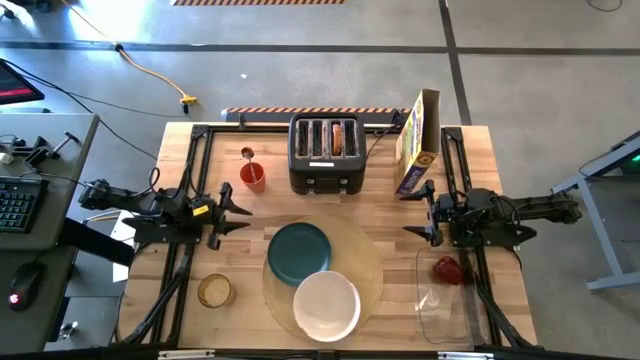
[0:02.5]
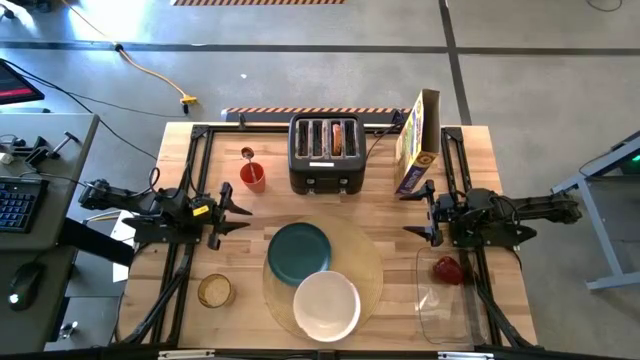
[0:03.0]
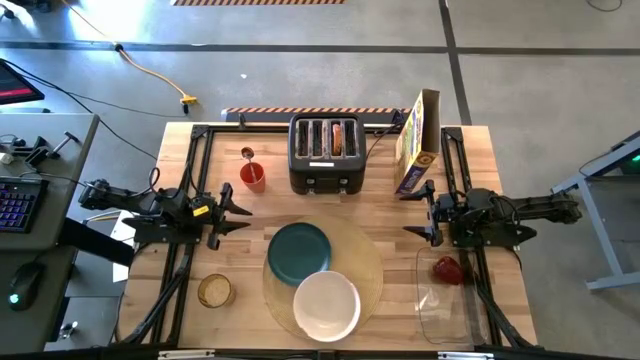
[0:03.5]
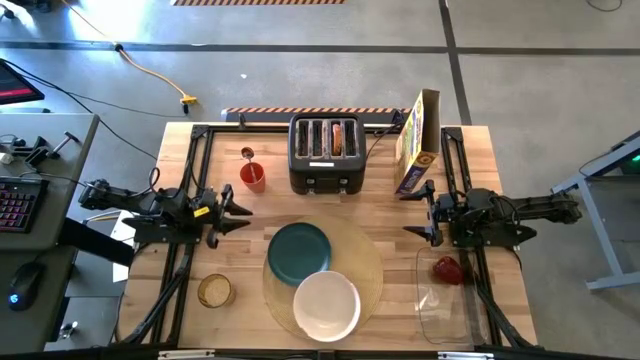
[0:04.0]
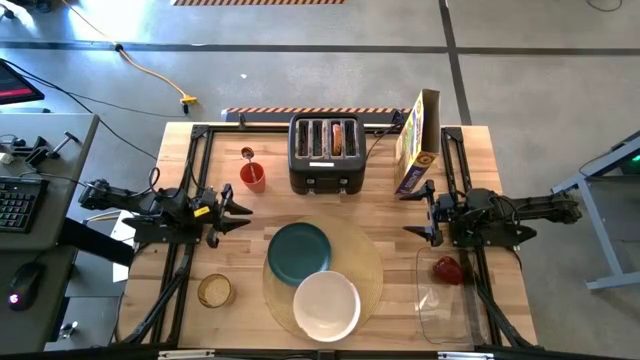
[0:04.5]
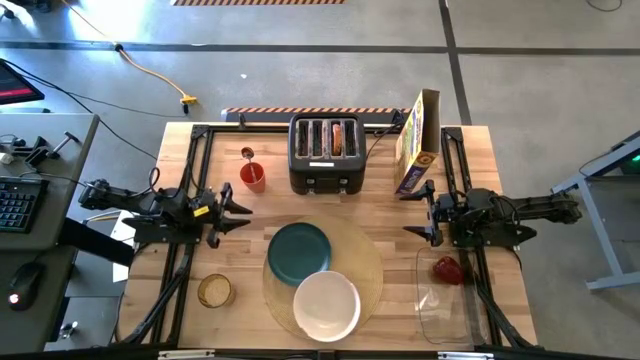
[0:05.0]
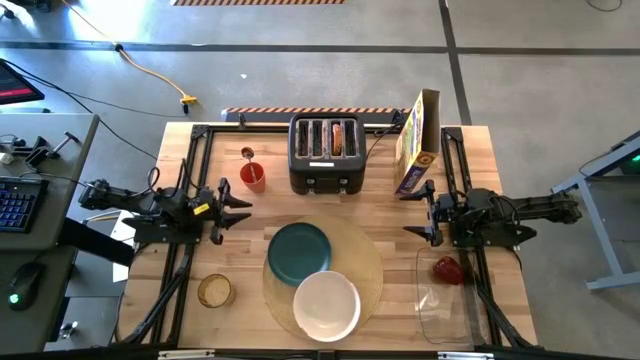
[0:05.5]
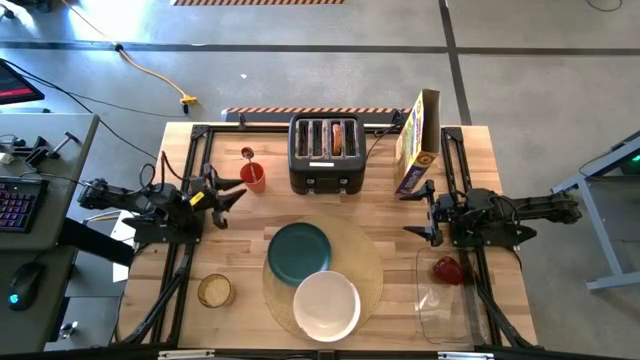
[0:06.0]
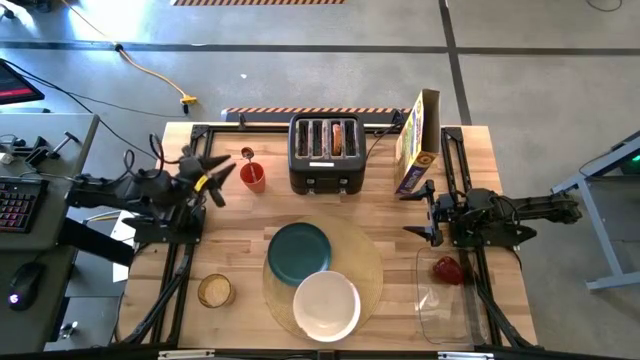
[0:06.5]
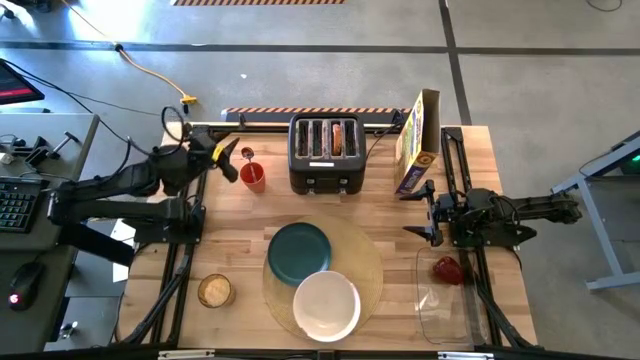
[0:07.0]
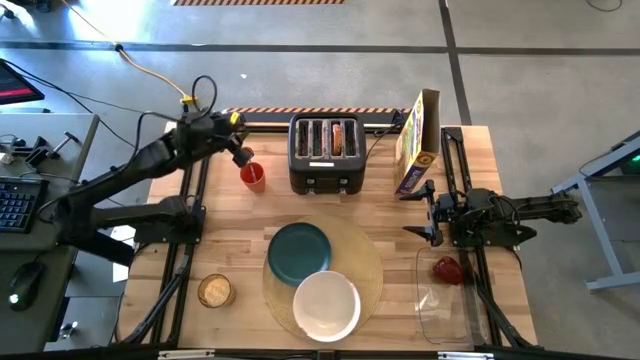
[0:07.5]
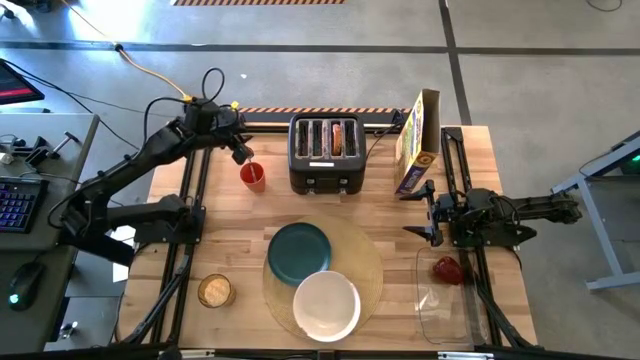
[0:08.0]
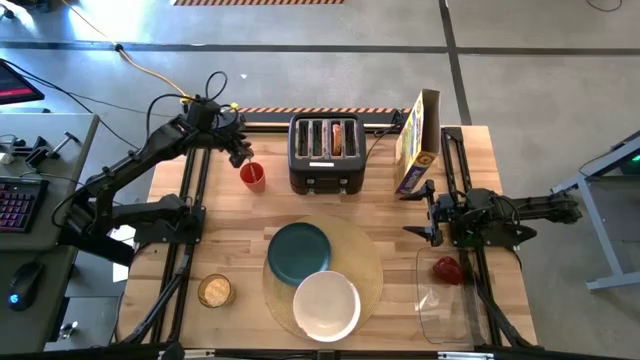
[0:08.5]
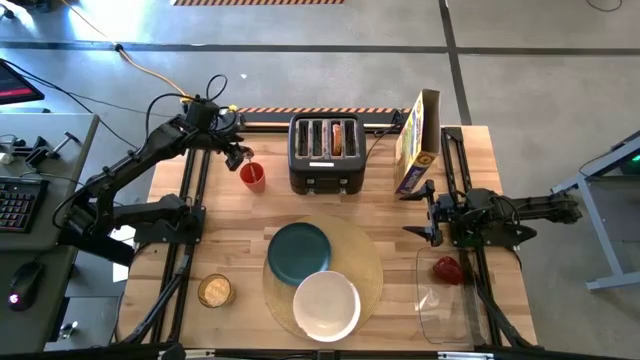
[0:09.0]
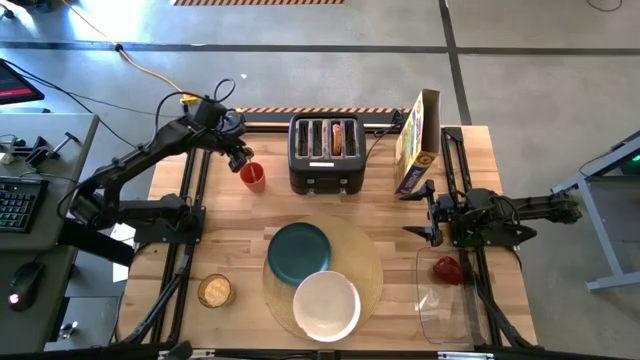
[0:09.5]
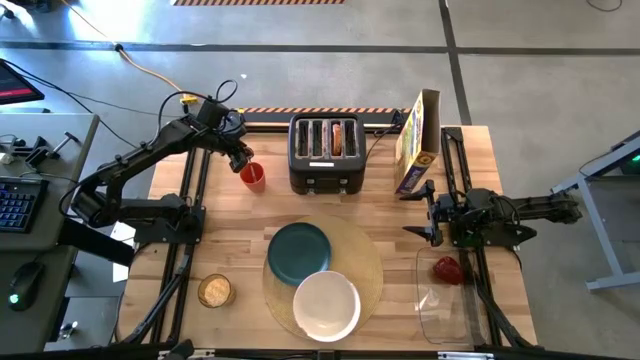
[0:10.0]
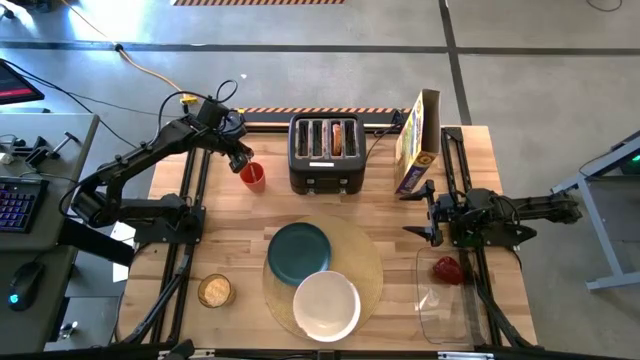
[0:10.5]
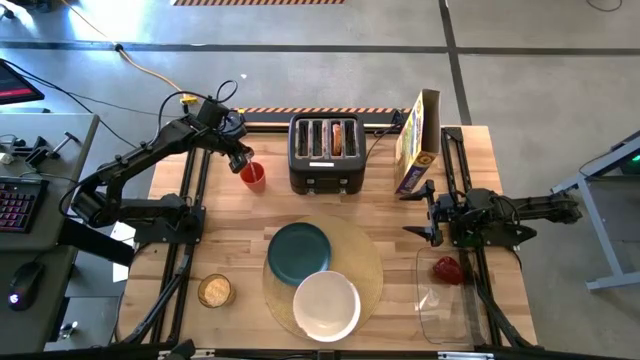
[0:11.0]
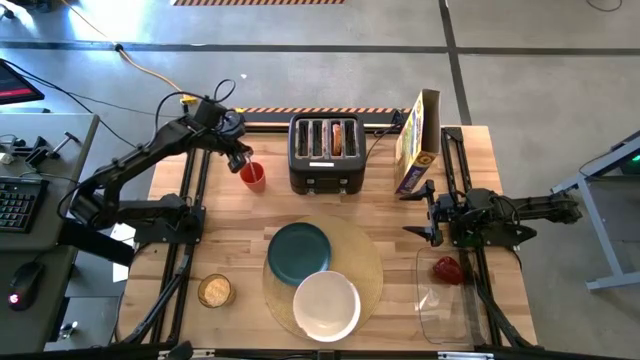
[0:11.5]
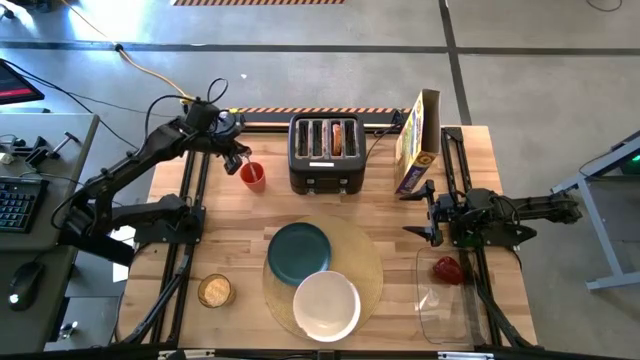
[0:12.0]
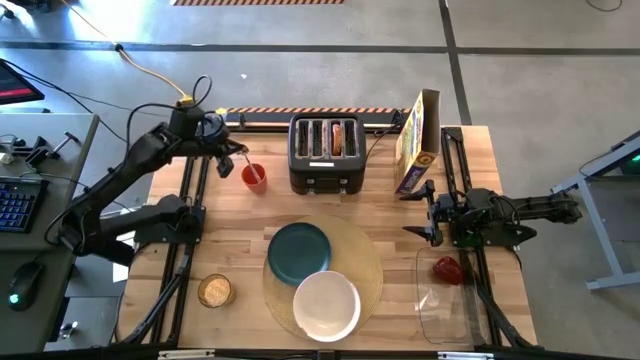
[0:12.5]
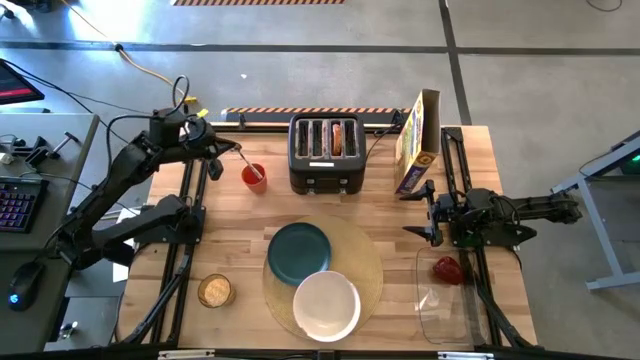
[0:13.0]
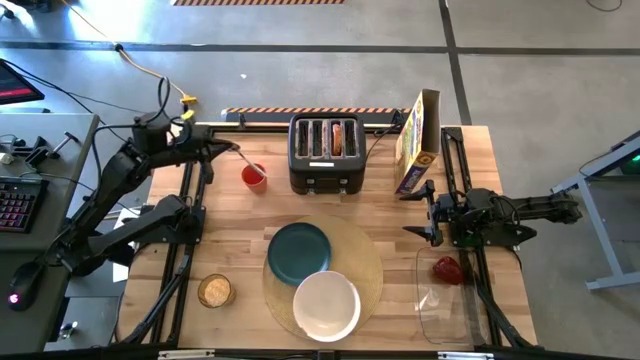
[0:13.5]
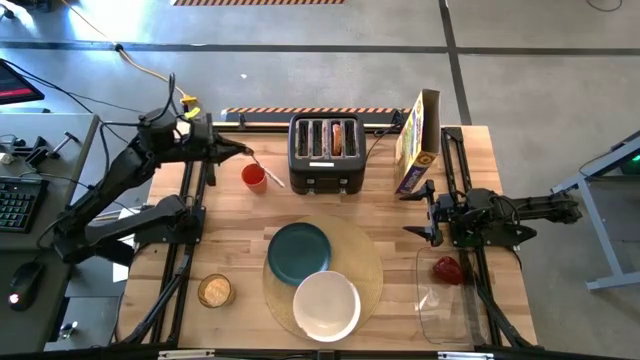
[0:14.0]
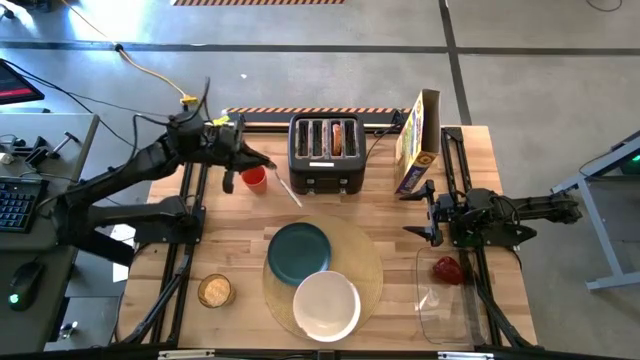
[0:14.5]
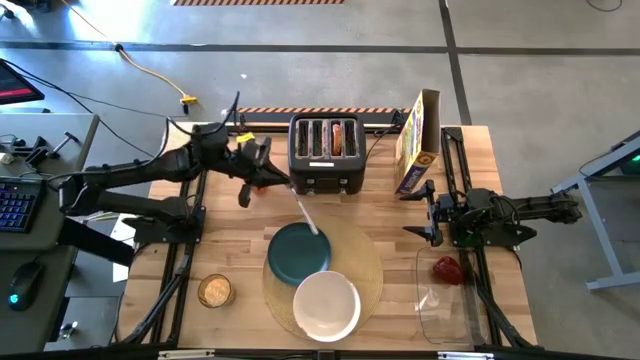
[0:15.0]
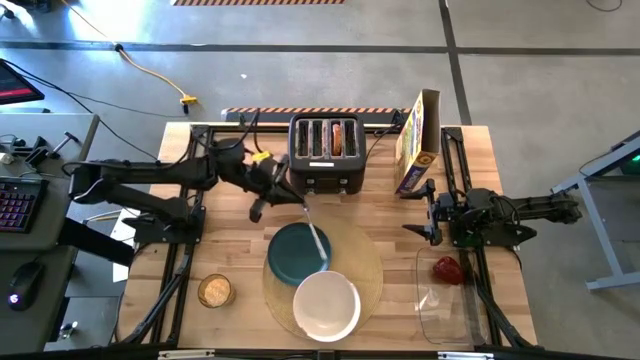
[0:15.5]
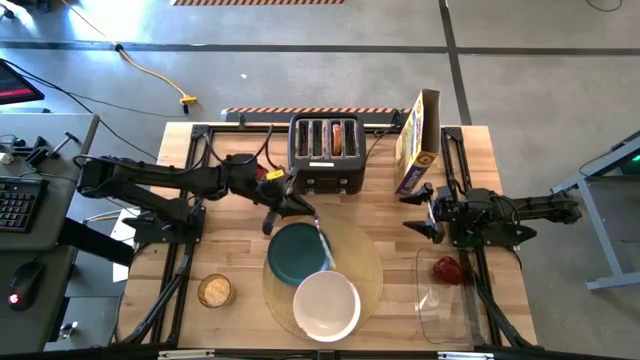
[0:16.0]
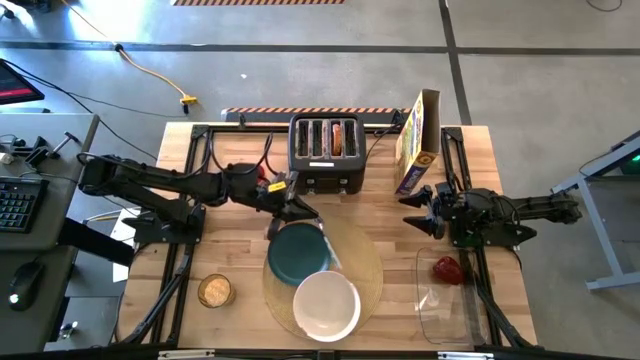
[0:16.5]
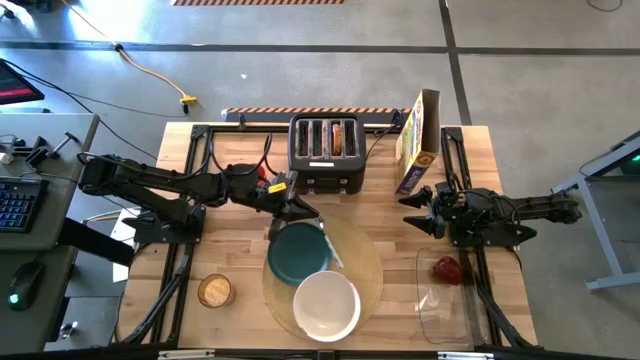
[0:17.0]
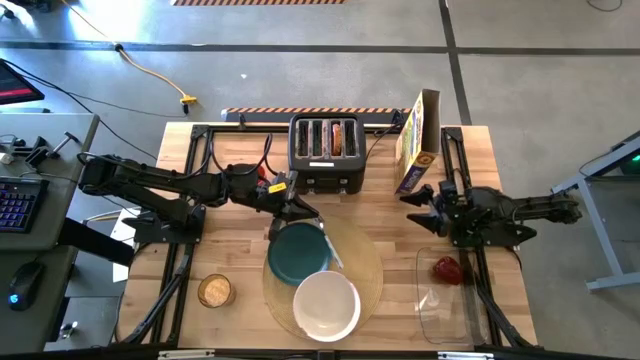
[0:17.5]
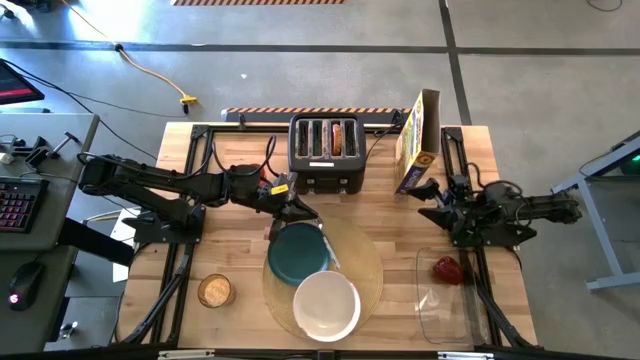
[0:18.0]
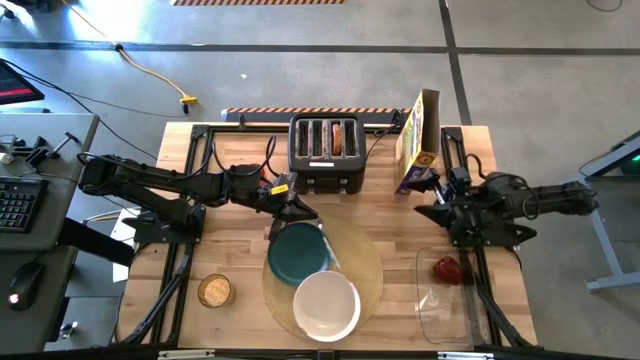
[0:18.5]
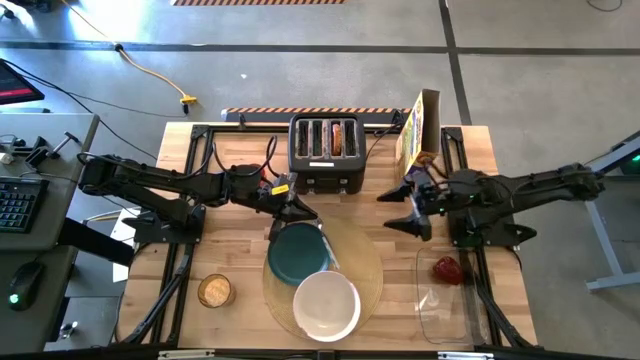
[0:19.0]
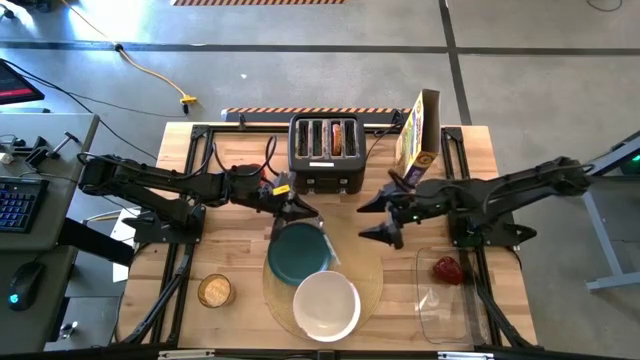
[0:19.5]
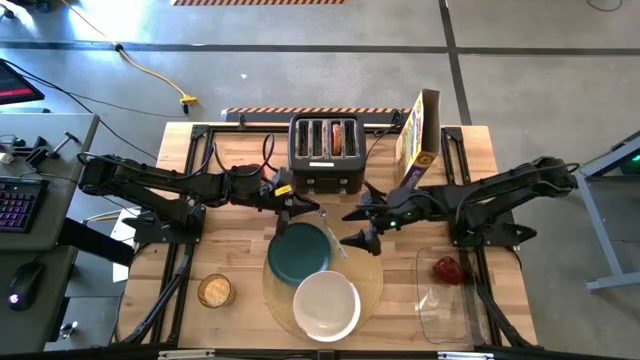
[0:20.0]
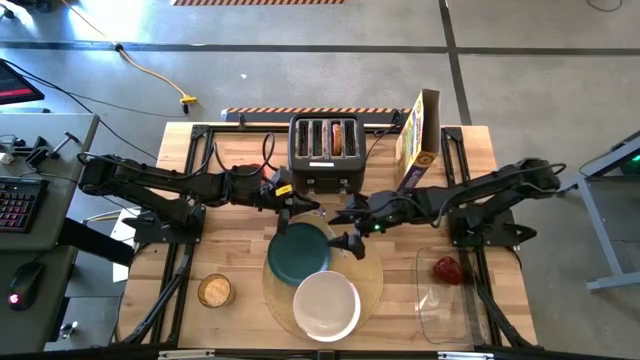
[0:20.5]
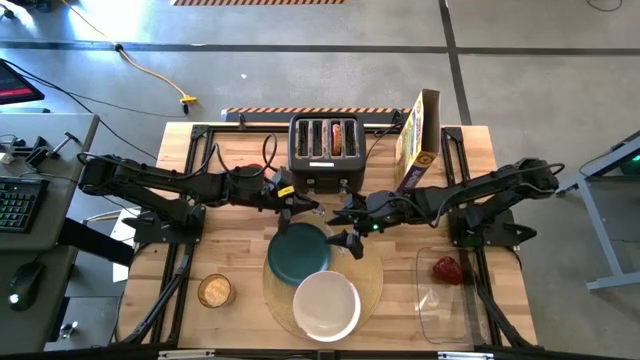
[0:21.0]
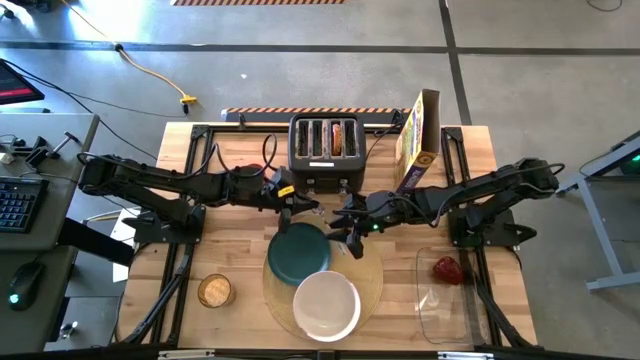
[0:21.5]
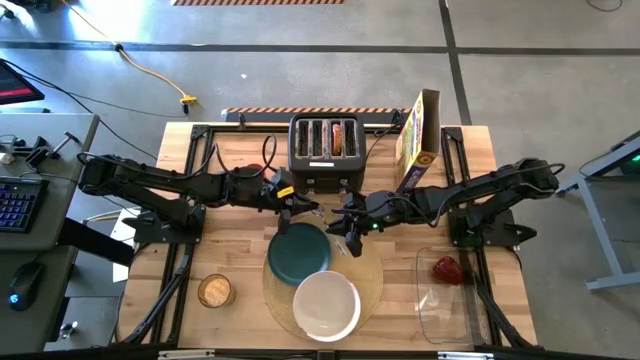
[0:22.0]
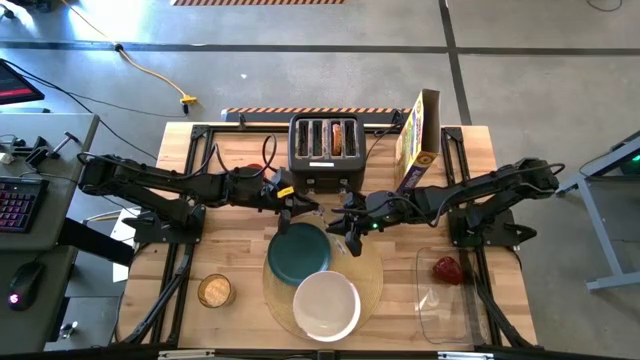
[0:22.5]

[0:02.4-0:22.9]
Task: Arrange a breakfast setting
Put the white patterned spoon on the brown table mat
